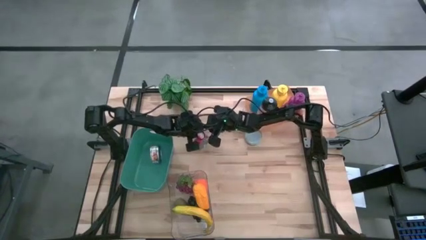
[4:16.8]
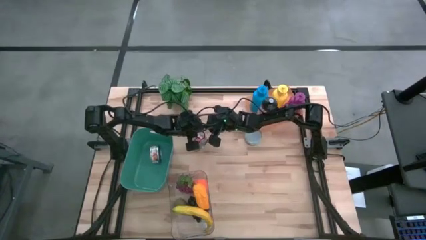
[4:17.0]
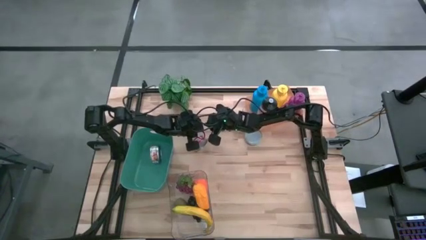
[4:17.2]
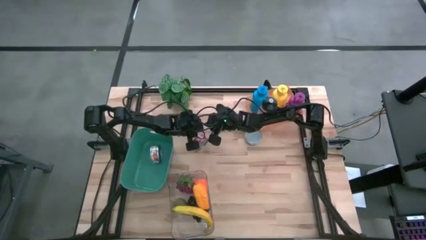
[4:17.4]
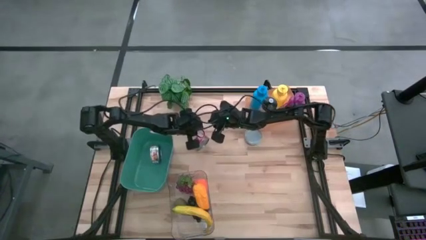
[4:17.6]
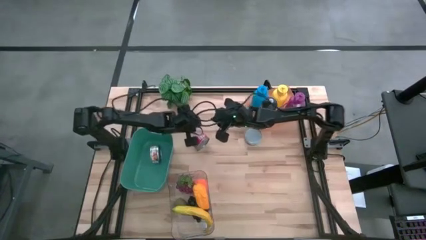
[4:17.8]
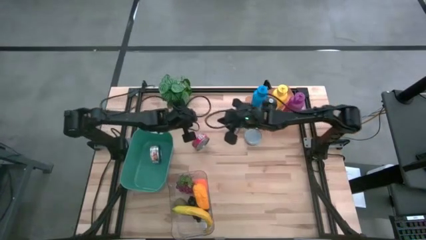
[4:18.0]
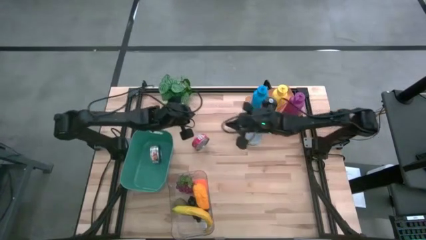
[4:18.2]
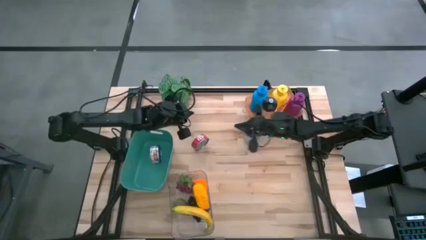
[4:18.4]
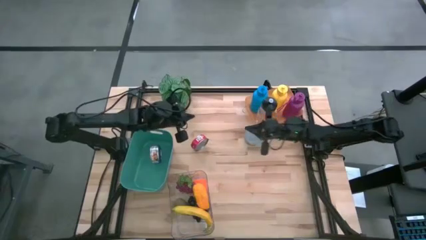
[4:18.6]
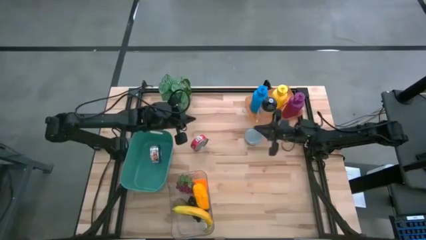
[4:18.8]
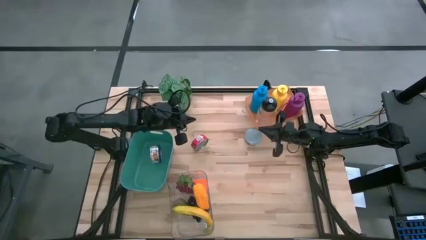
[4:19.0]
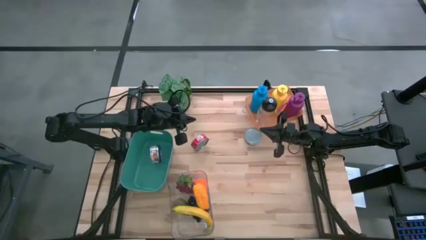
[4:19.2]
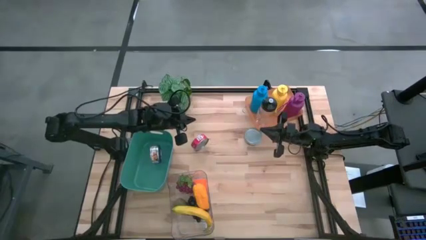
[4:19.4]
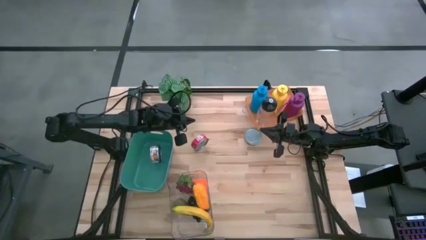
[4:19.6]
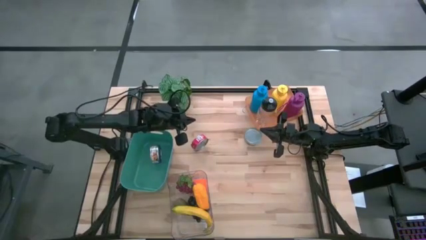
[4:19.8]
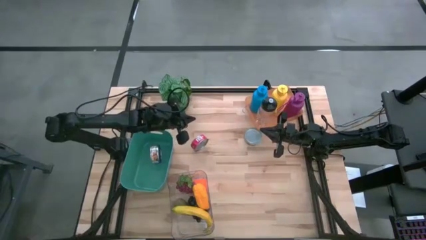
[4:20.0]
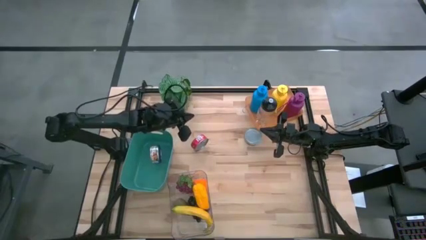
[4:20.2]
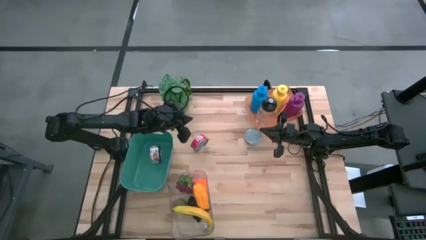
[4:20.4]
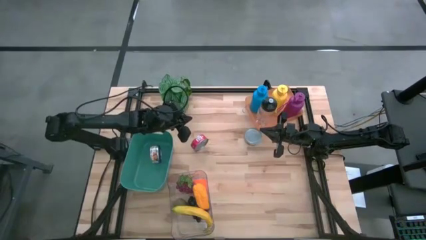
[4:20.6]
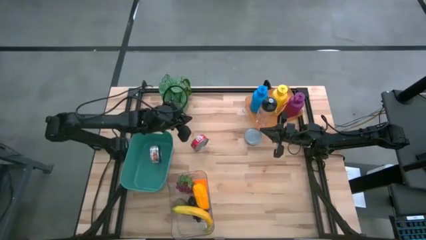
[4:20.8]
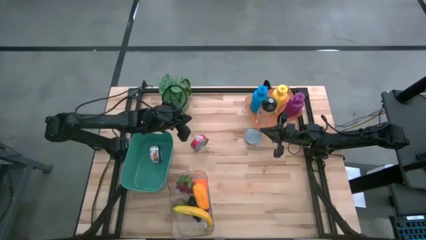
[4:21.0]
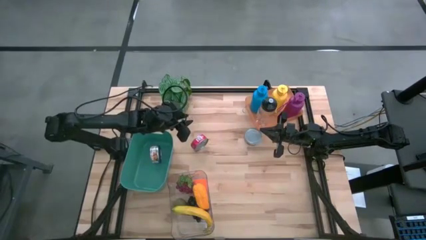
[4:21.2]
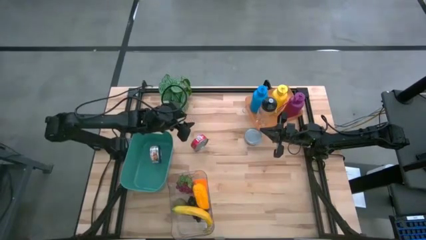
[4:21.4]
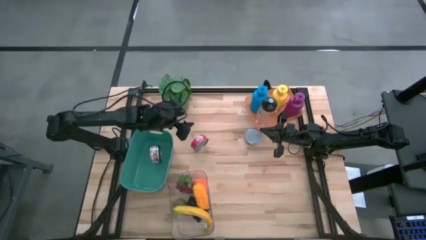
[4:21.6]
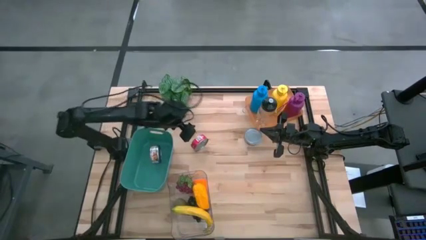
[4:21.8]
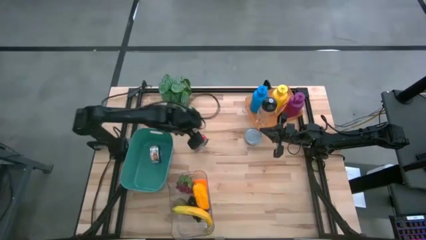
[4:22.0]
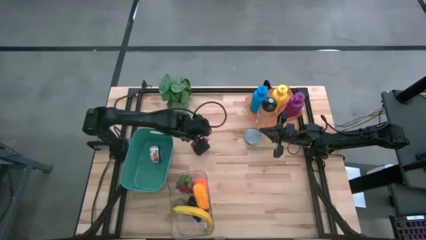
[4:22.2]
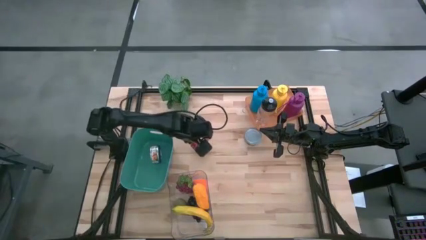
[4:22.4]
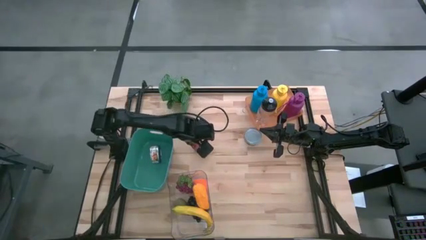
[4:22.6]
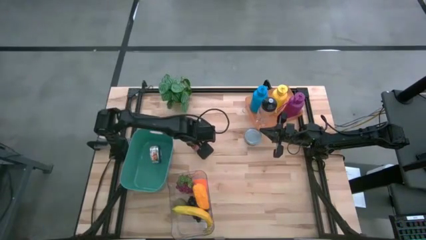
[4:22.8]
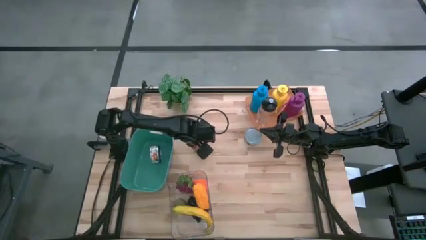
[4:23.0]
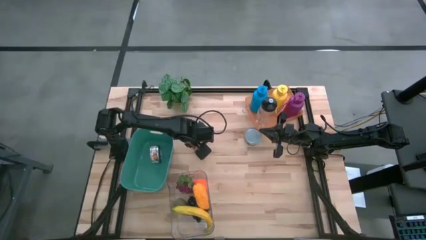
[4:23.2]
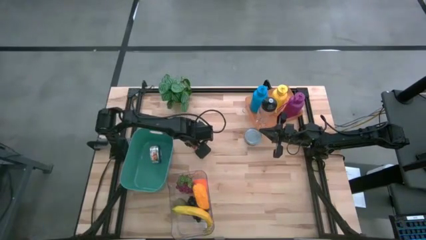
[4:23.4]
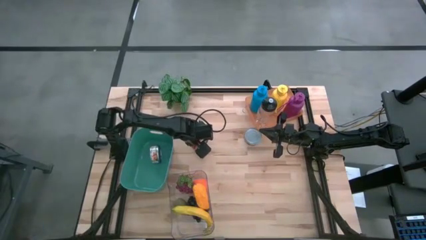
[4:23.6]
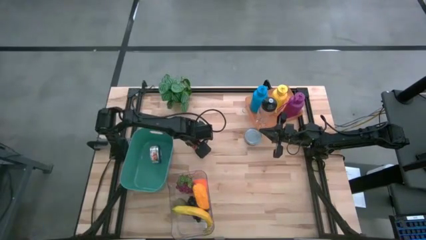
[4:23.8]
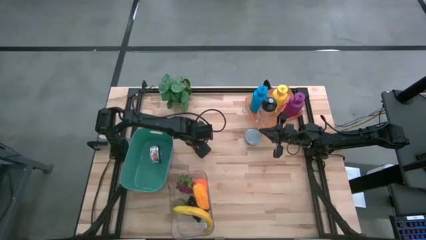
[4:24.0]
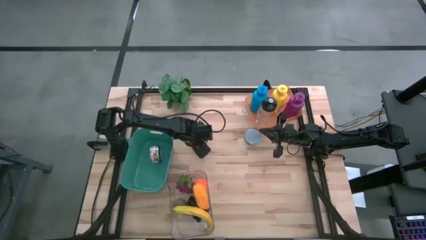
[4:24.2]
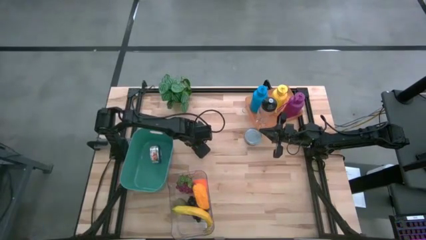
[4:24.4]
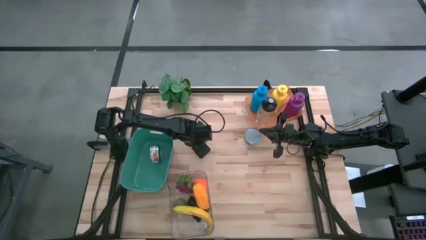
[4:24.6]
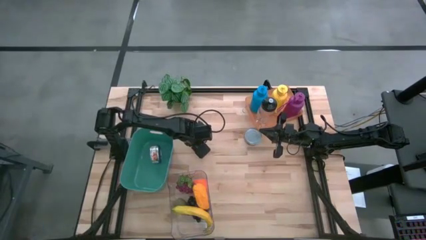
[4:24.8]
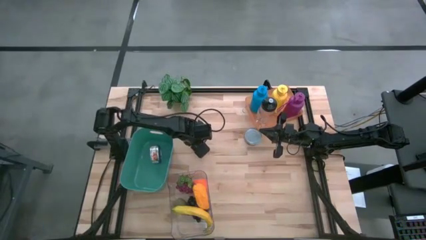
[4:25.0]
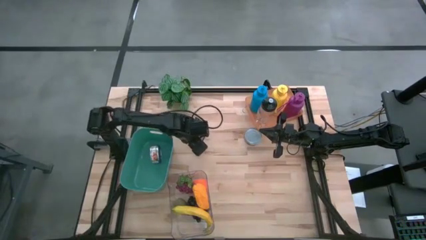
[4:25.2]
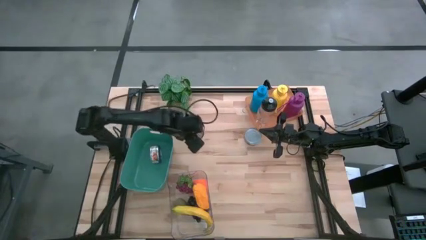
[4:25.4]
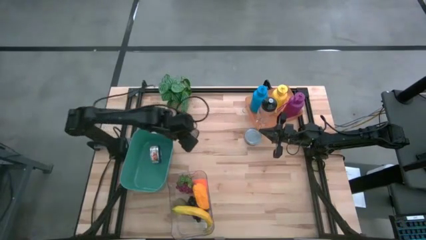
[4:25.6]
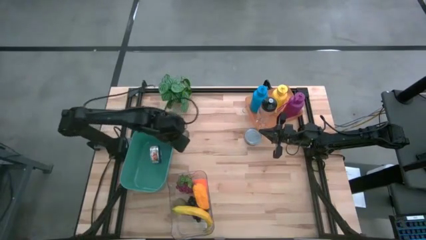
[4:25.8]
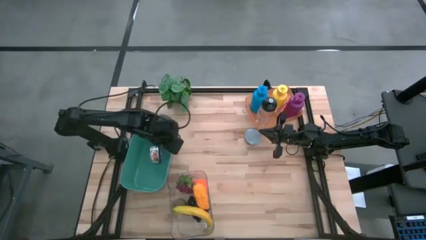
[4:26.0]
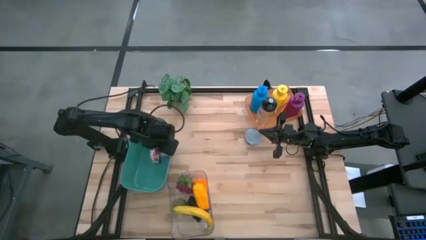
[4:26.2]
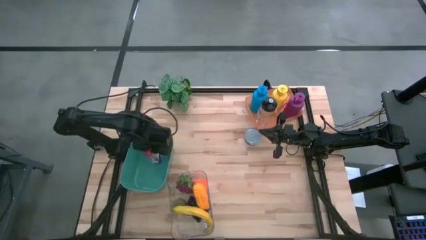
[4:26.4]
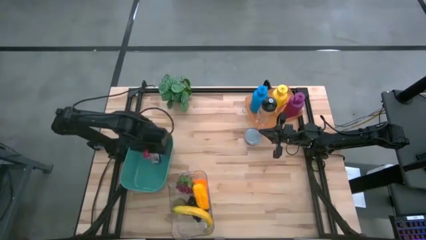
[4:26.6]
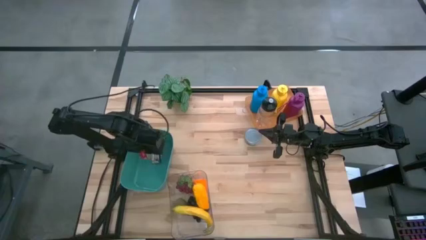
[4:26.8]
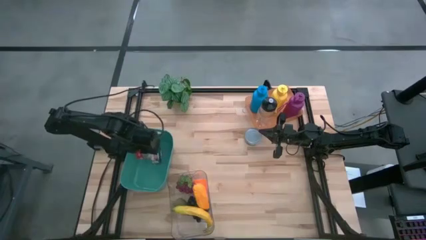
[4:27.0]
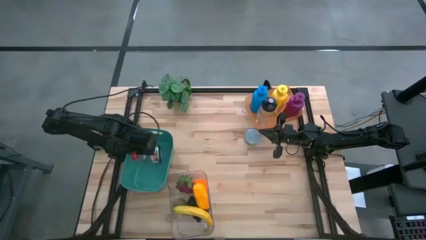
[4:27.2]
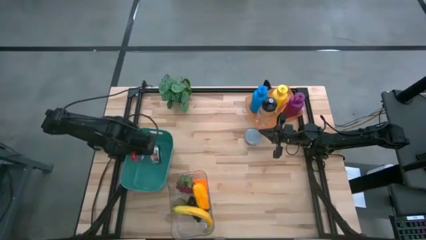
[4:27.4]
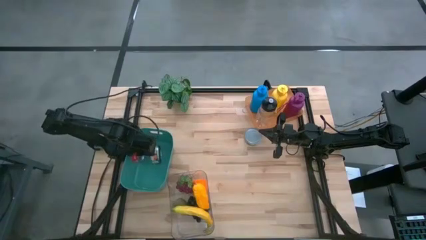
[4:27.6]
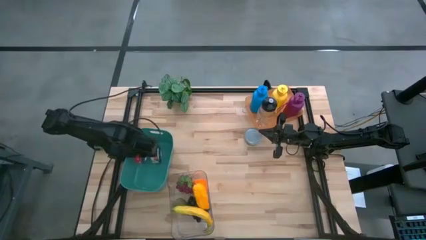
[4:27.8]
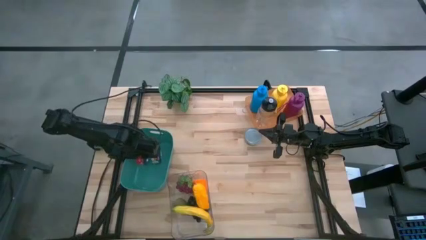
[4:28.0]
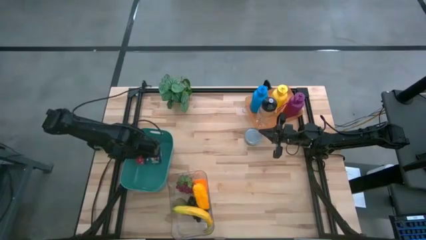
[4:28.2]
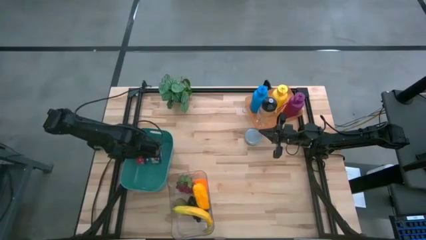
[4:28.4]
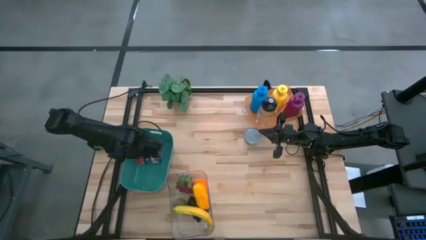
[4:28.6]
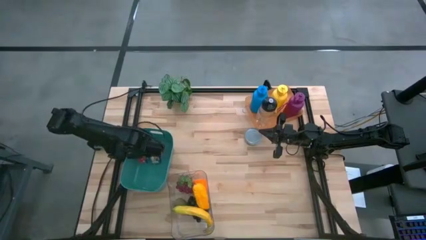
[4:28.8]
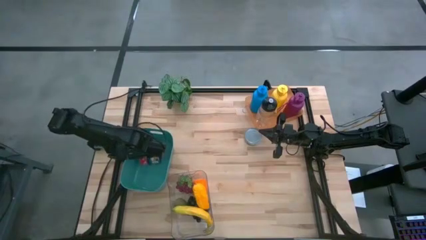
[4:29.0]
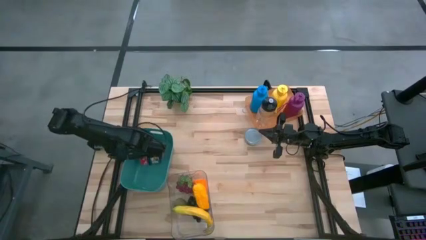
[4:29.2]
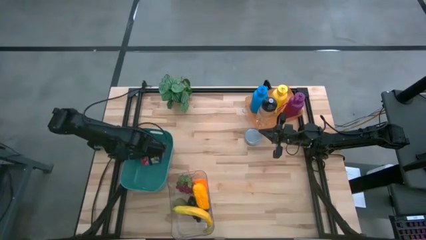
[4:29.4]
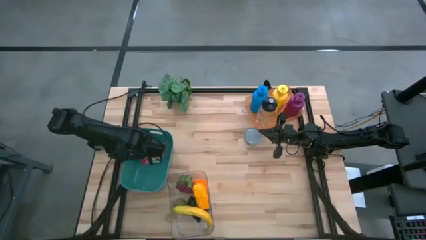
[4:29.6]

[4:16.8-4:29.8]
Task: Pick & Place Food Item
Put the red tuna can into the blue bin

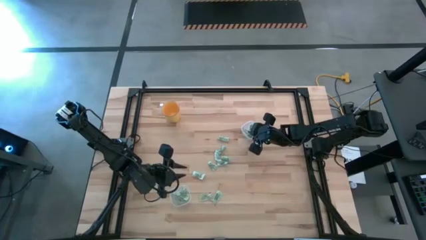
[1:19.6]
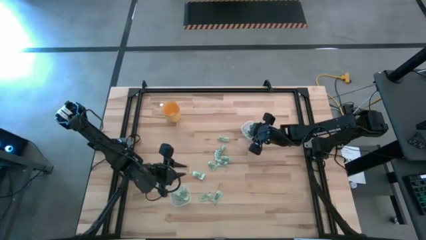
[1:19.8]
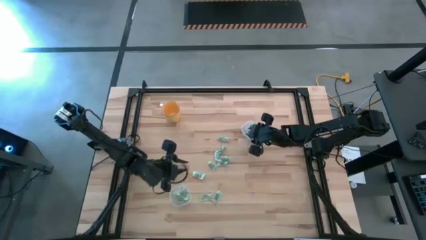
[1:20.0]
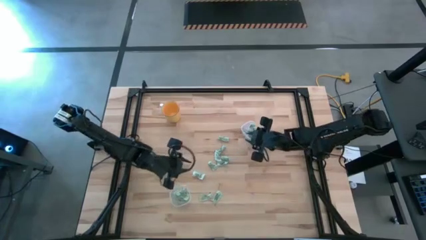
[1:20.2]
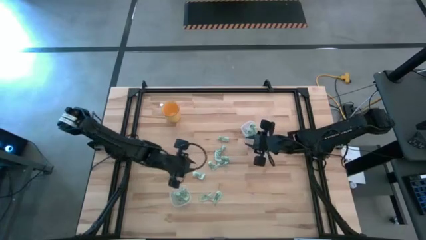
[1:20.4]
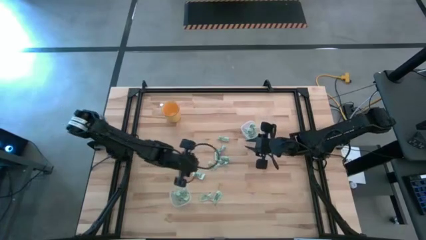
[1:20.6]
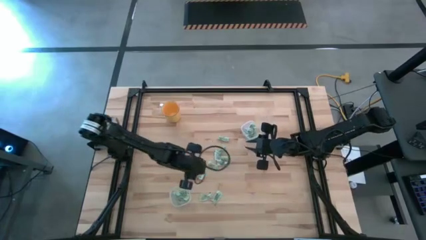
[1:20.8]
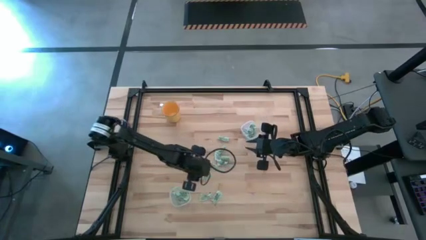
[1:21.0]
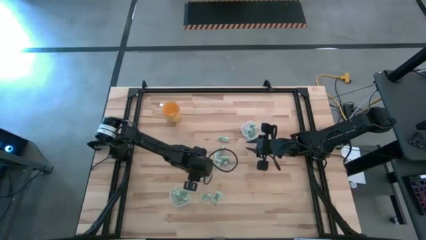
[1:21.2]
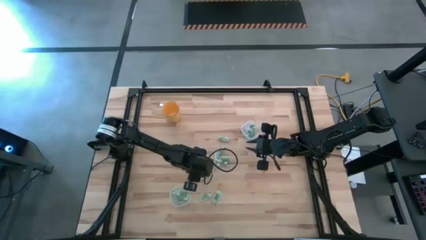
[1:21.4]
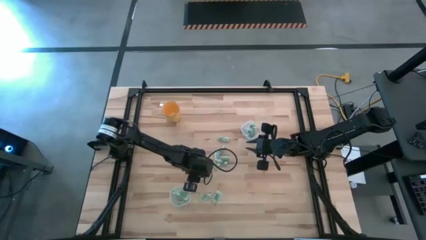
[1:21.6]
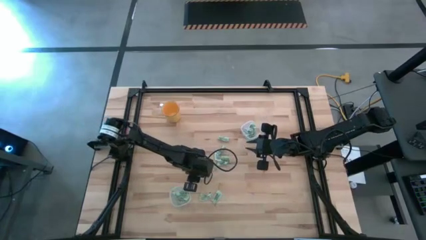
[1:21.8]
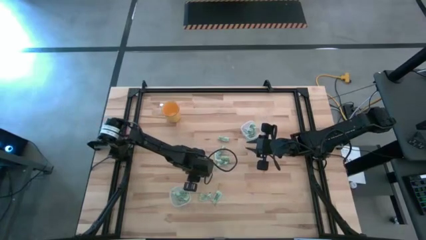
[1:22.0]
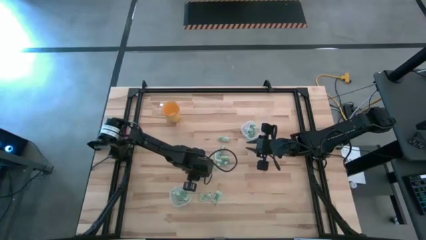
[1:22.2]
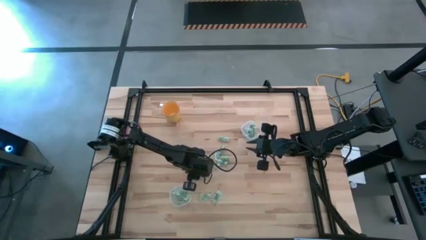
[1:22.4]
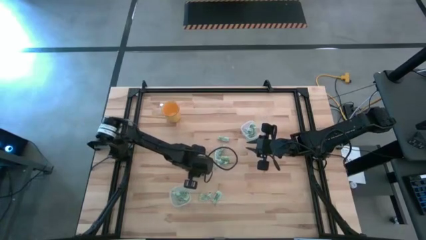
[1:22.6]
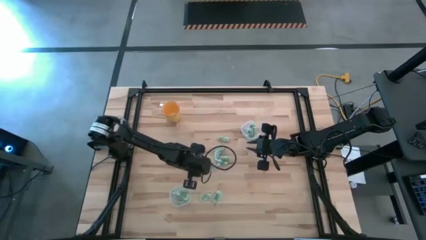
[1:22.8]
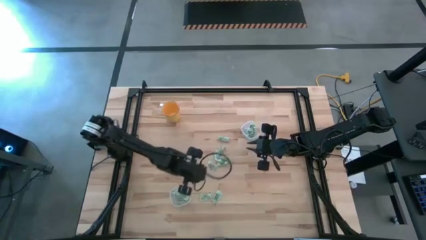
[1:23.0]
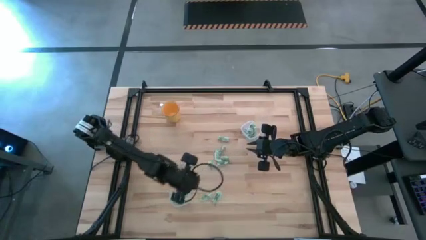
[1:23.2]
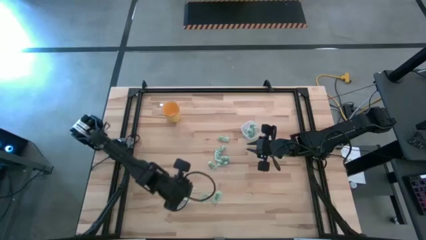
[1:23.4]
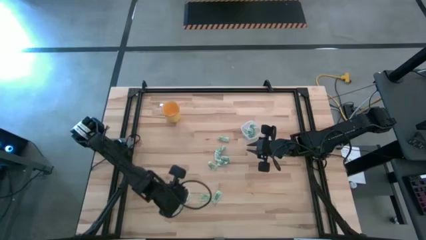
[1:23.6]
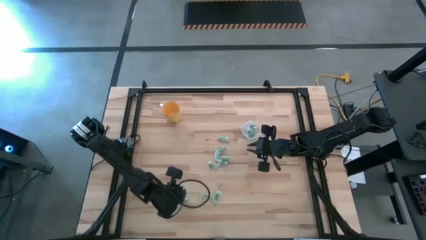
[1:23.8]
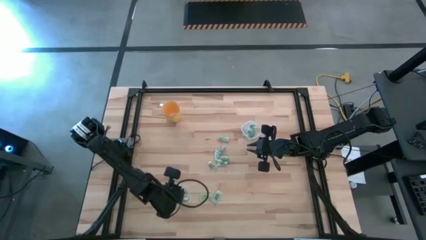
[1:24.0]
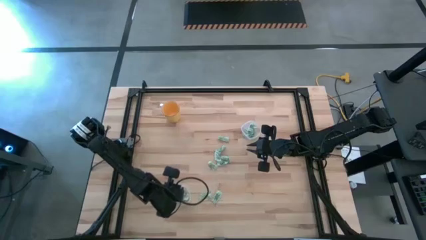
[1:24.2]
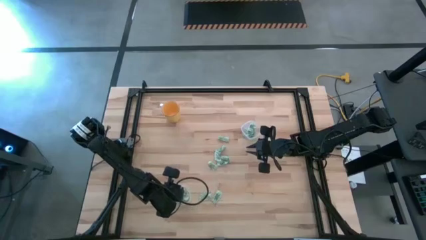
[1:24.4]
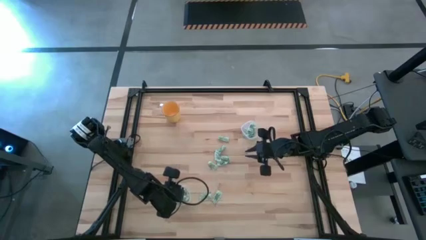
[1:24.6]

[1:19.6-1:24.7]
Task: Pick and place Stevia / Truvia into bins
Put the green stevia packet into the bottom transparent container
